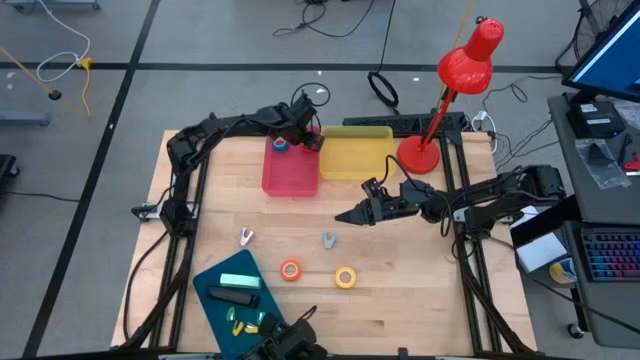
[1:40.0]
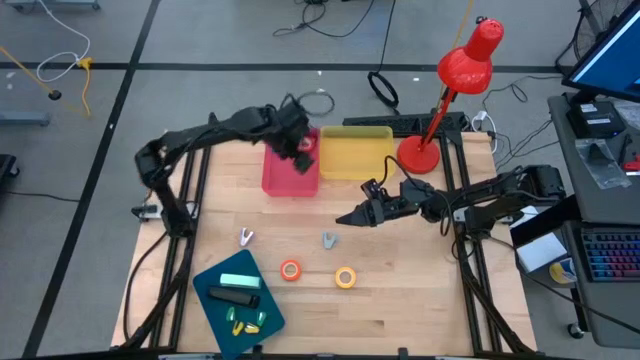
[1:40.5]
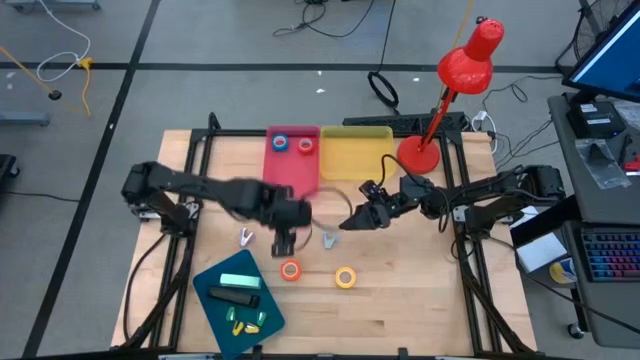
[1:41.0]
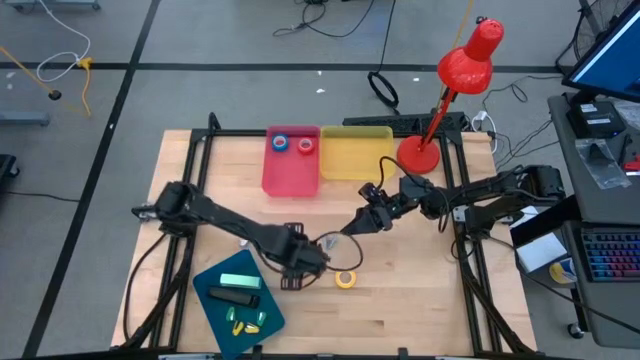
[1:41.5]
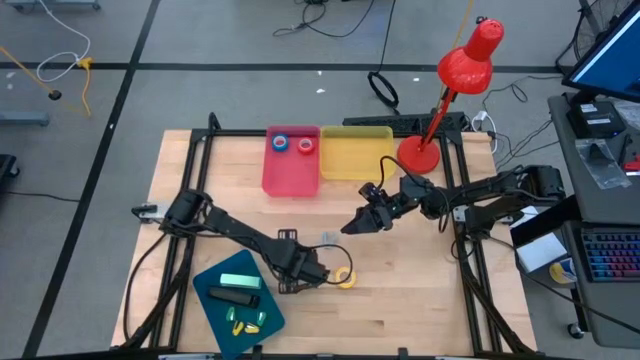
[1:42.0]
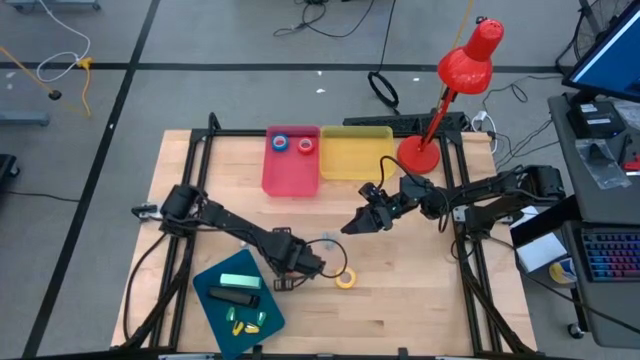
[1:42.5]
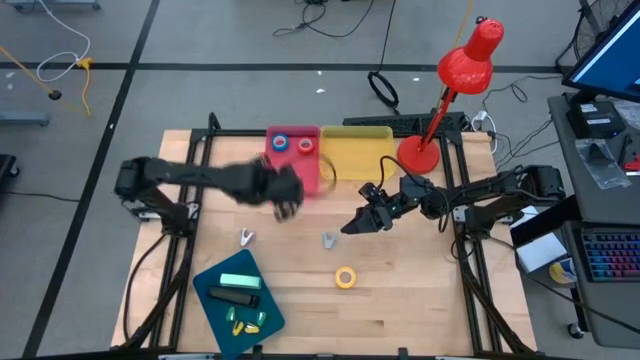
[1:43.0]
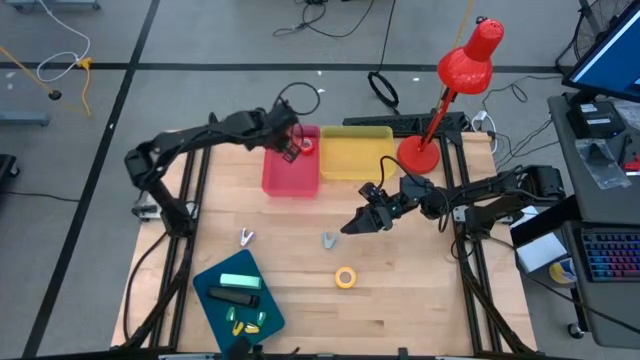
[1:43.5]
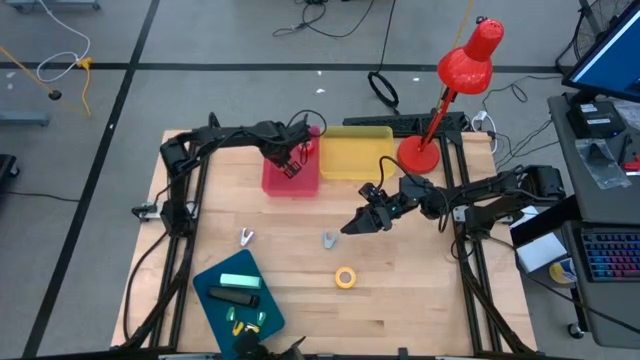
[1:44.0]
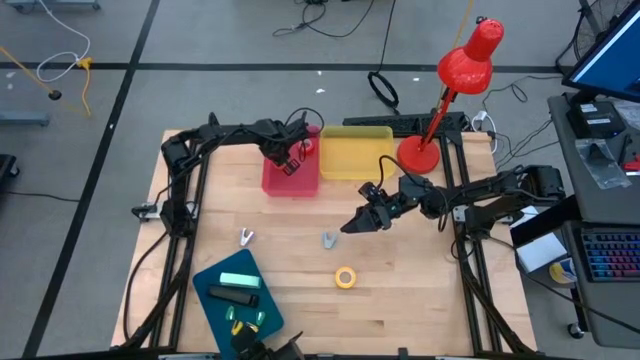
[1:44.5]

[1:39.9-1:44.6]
Task: Pick and place Stapler, Stapler remover, tape
Put the orange tape into the red bin

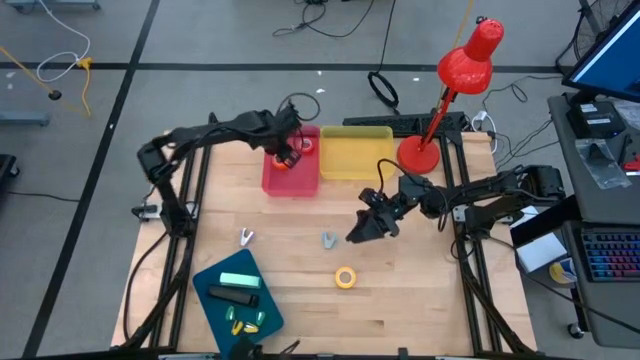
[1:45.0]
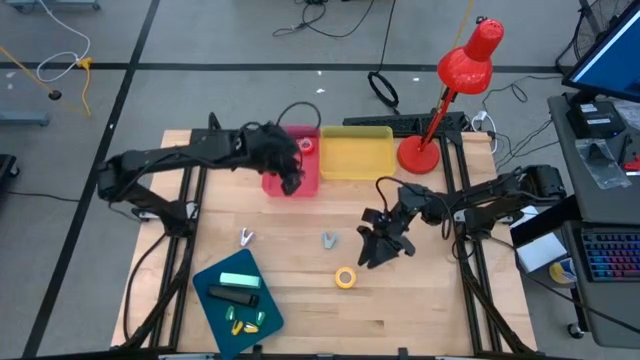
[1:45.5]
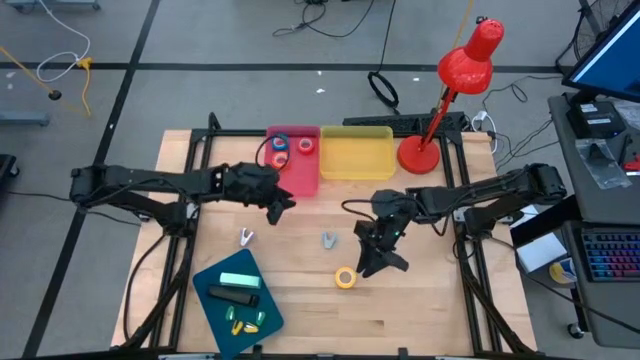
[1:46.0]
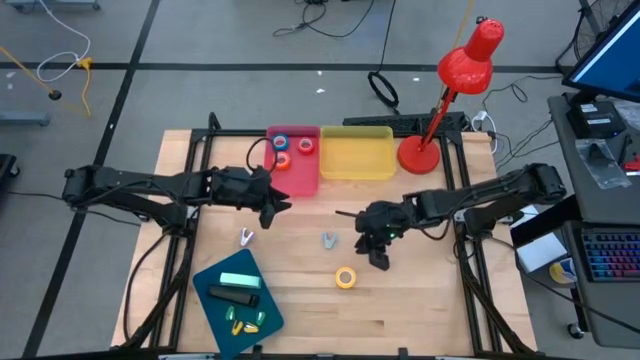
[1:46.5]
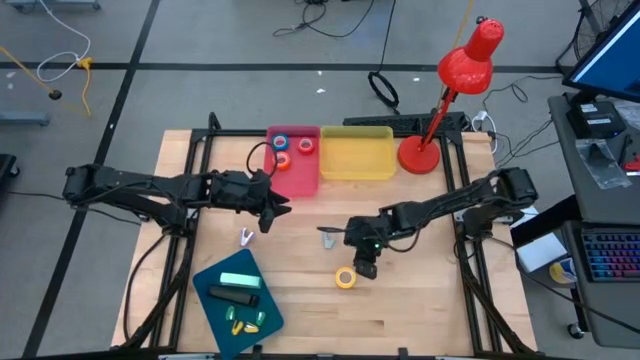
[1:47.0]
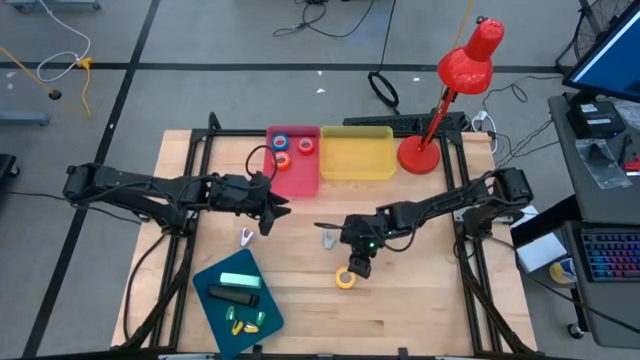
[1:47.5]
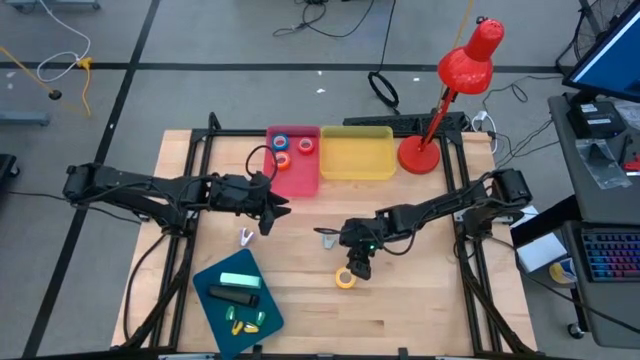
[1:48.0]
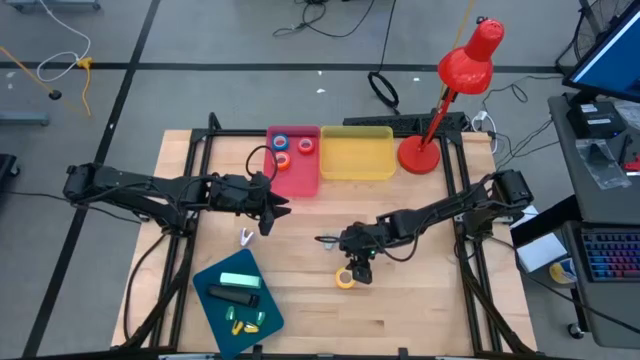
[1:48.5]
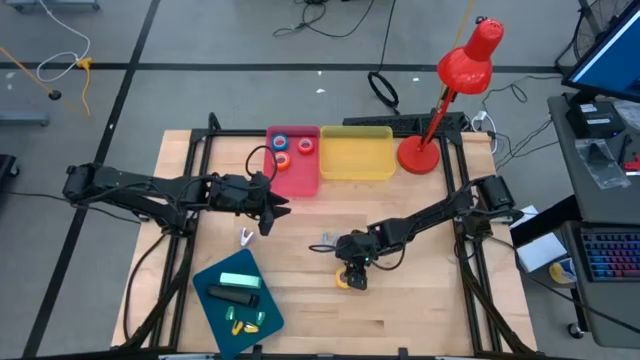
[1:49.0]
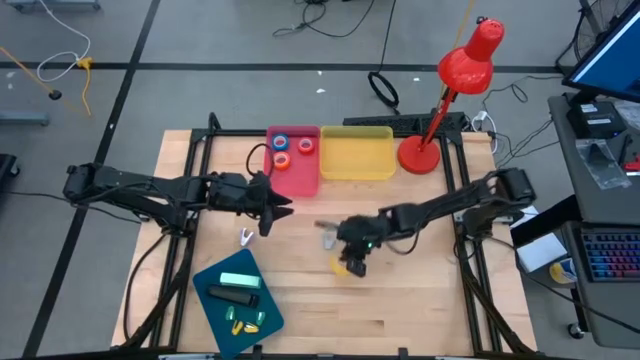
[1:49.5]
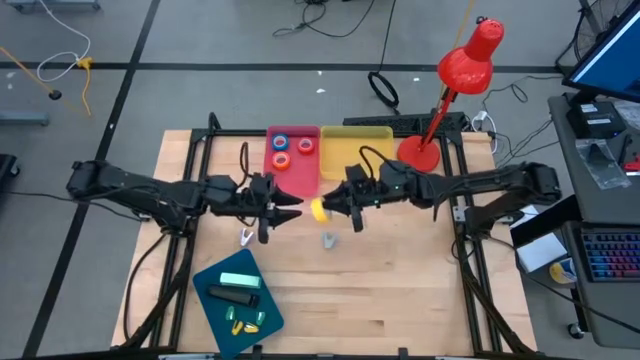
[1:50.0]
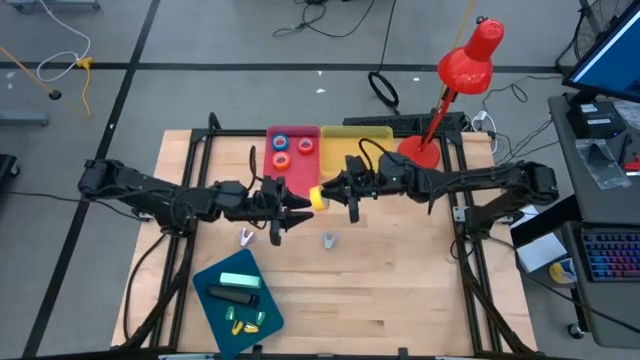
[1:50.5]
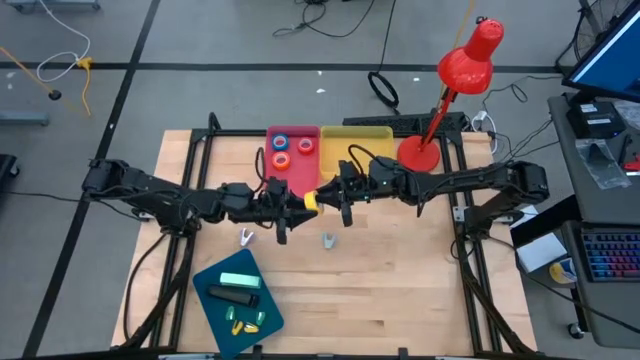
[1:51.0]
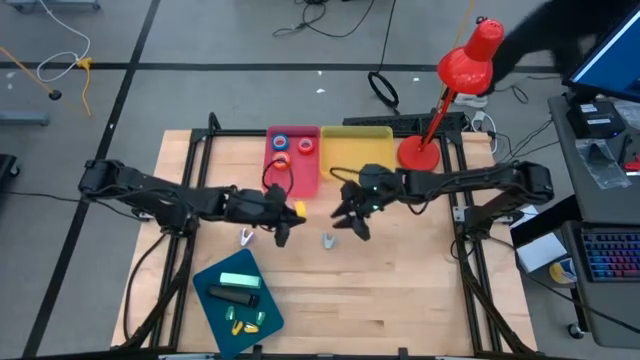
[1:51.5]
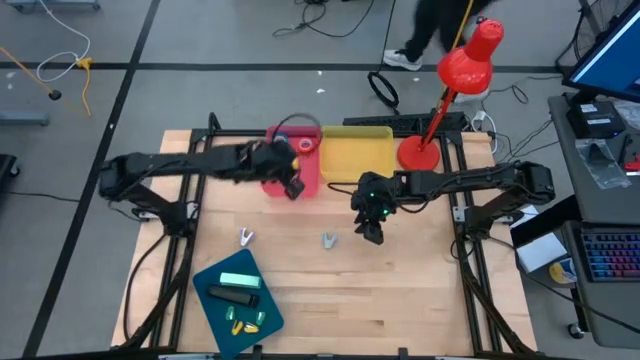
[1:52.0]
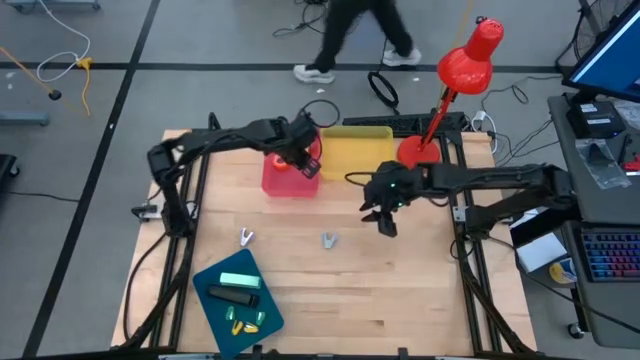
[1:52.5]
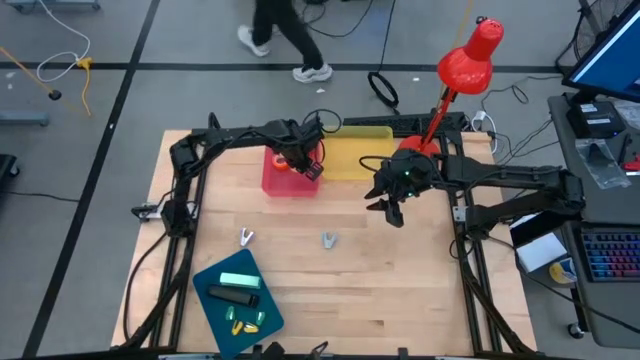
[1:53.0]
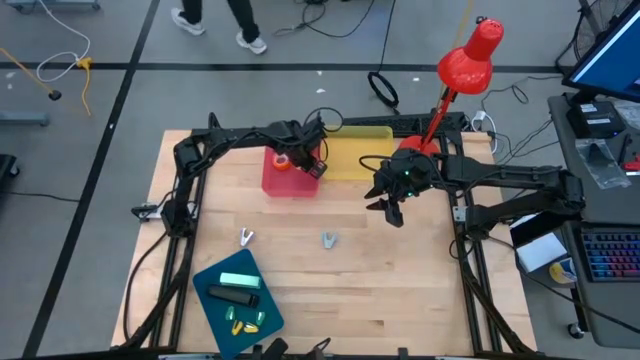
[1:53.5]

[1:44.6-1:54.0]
Put the yellow tape into the red bin

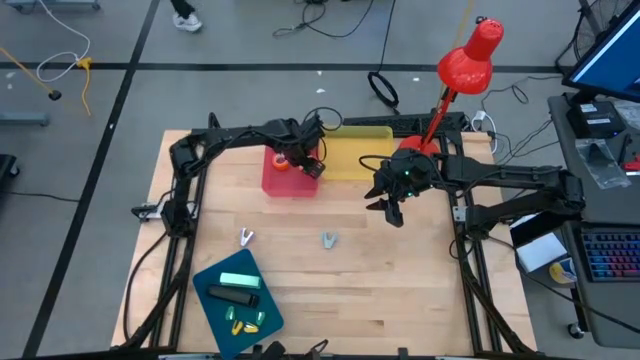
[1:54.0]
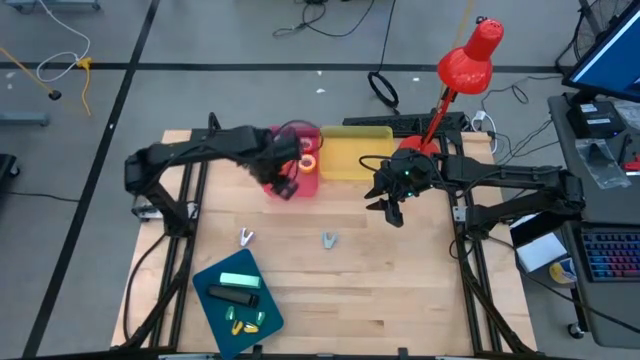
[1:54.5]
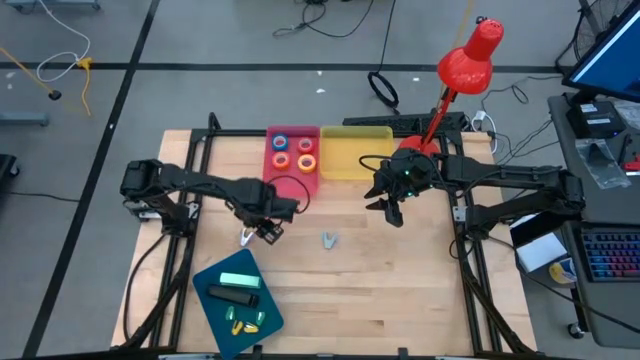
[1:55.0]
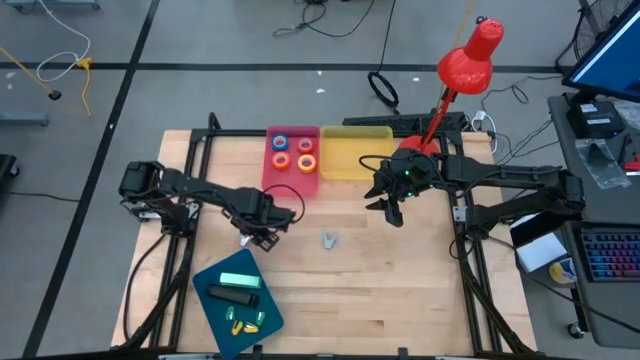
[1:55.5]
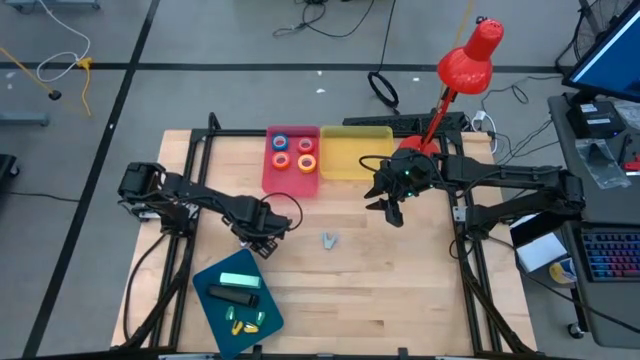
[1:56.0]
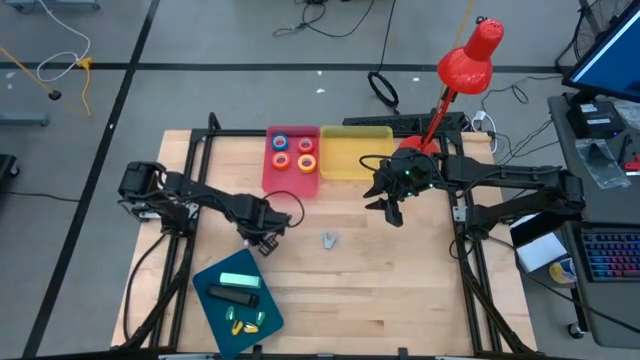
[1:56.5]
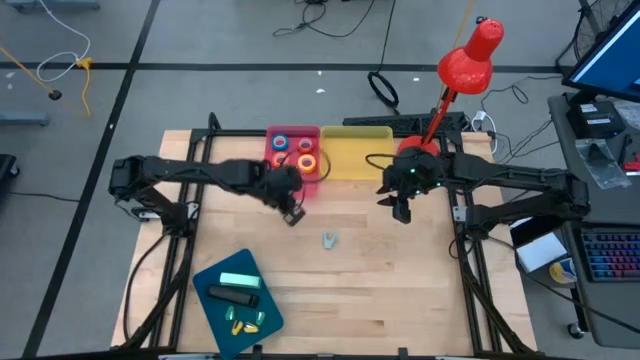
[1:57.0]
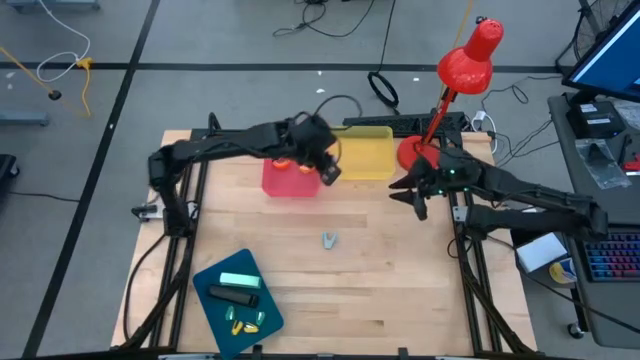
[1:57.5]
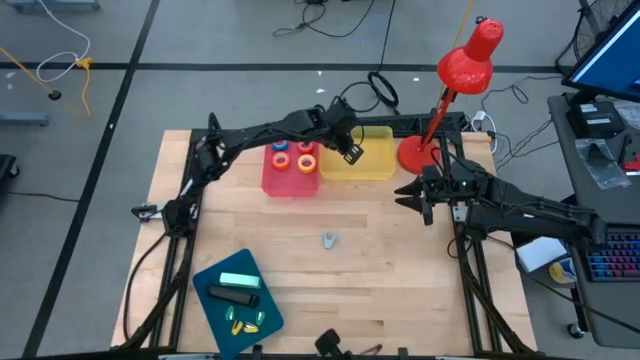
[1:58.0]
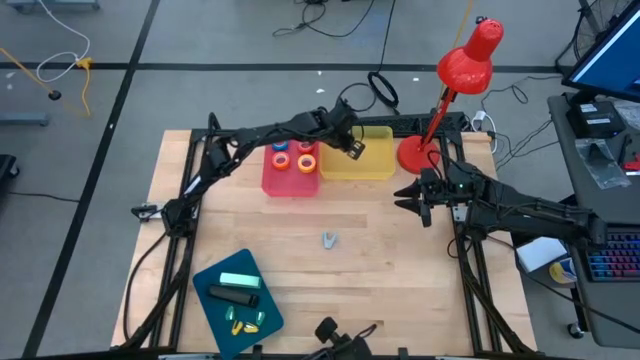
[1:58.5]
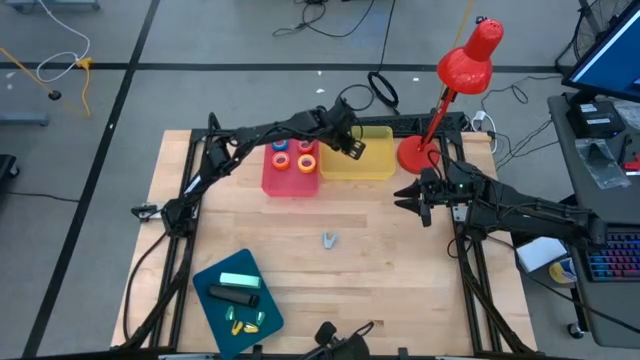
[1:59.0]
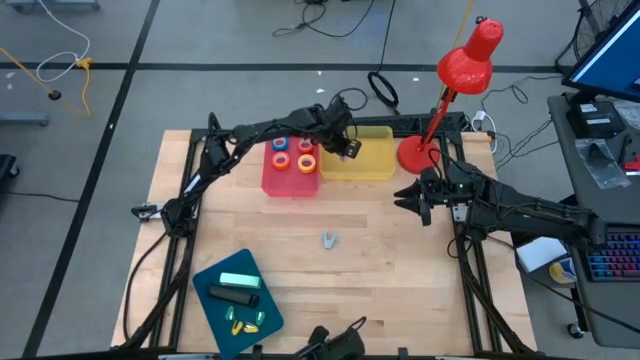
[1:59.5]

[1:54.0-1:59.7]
Put the purple staple remover into the yellow bin
